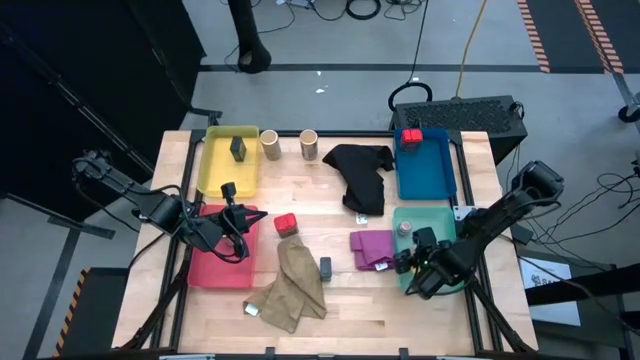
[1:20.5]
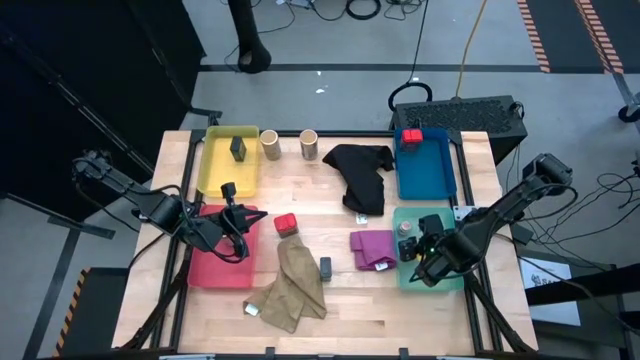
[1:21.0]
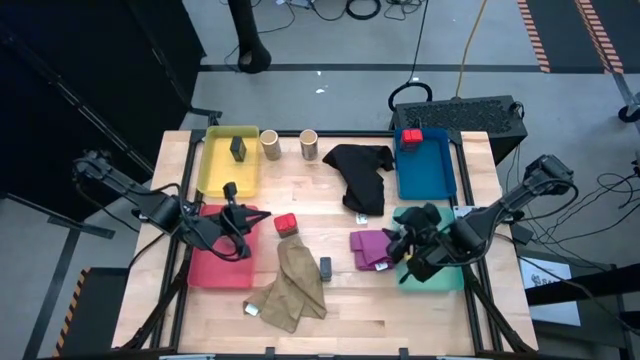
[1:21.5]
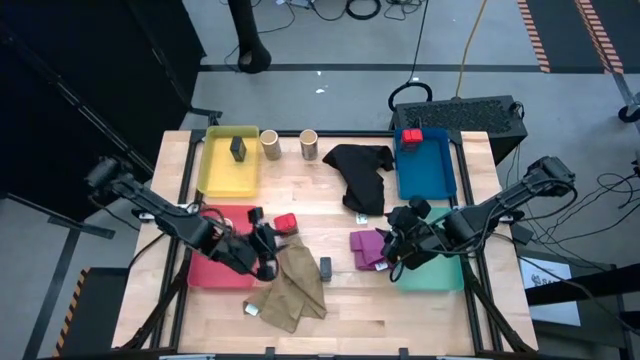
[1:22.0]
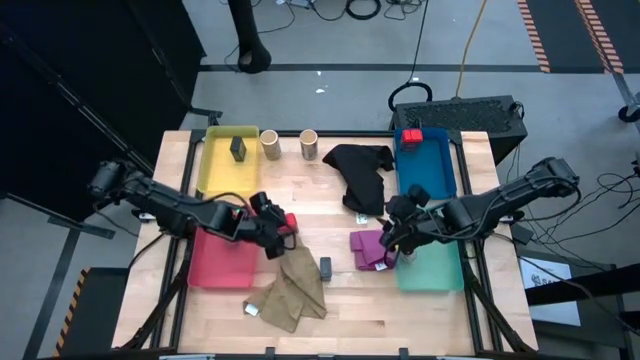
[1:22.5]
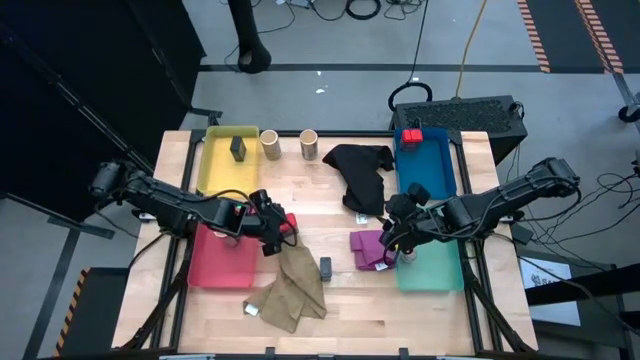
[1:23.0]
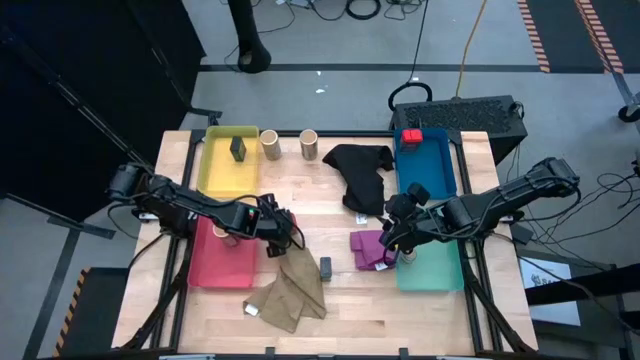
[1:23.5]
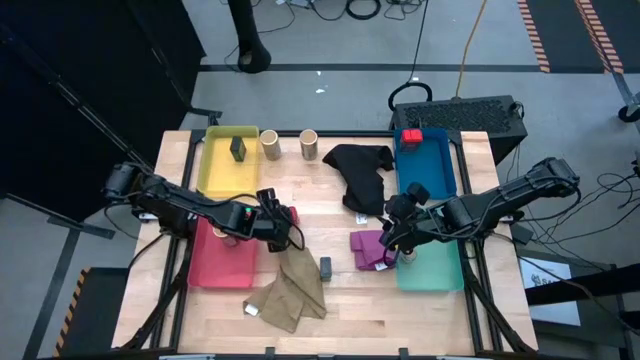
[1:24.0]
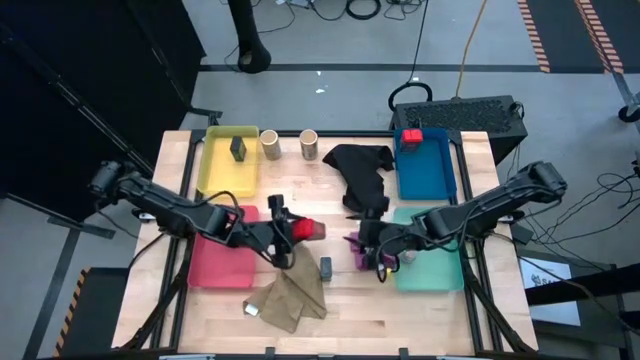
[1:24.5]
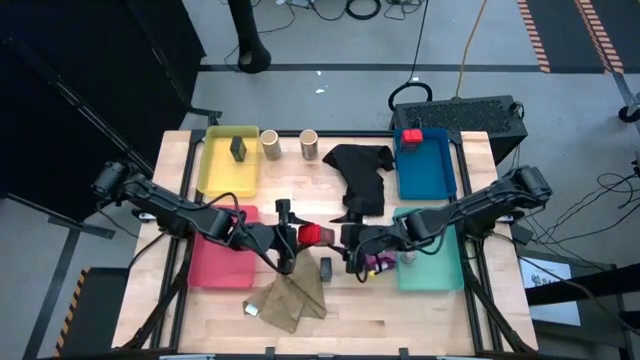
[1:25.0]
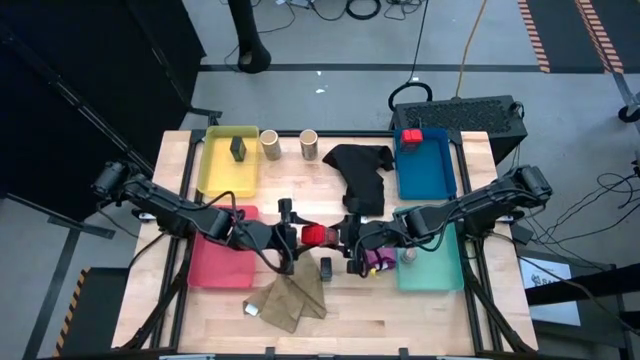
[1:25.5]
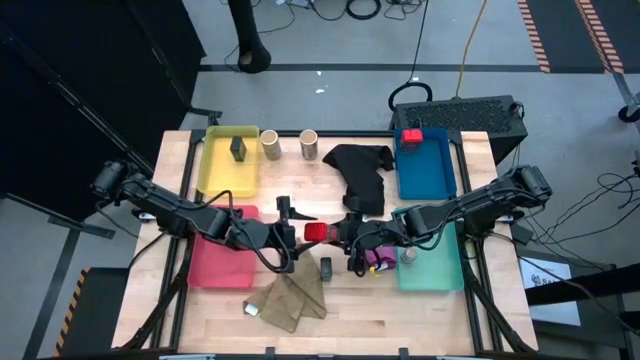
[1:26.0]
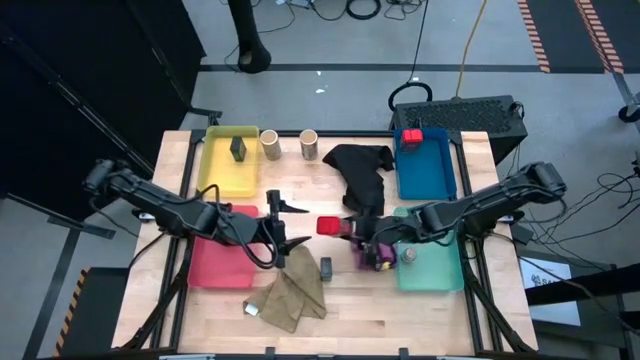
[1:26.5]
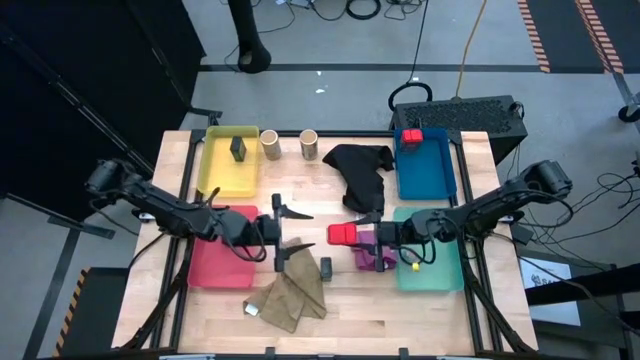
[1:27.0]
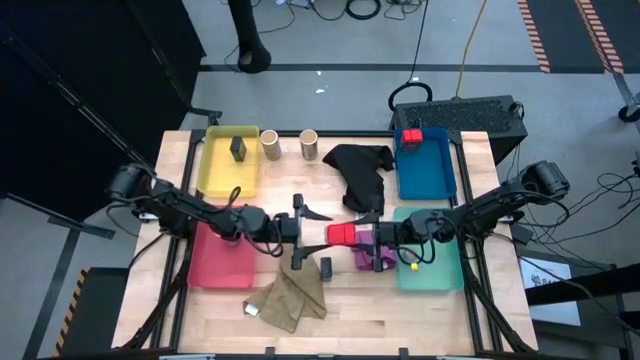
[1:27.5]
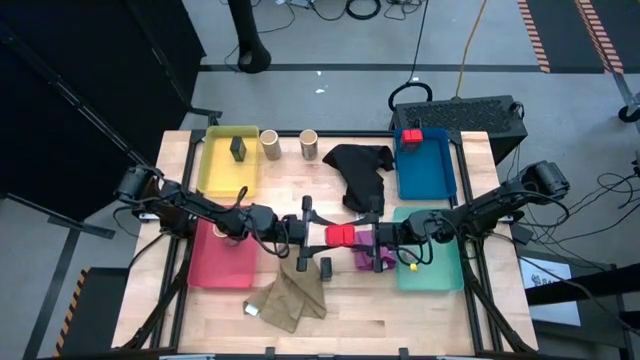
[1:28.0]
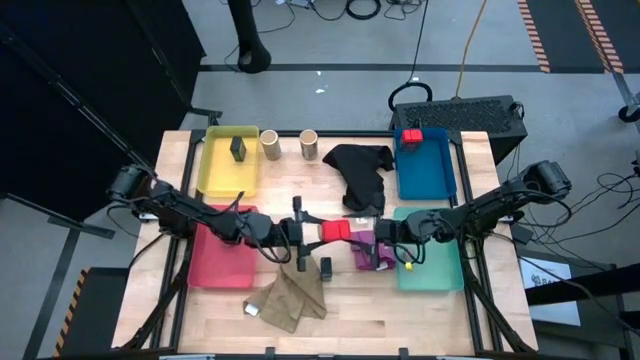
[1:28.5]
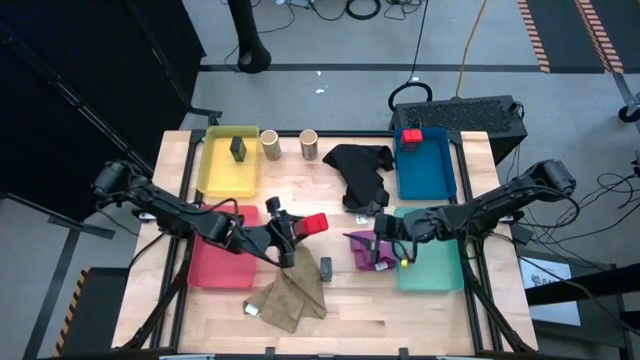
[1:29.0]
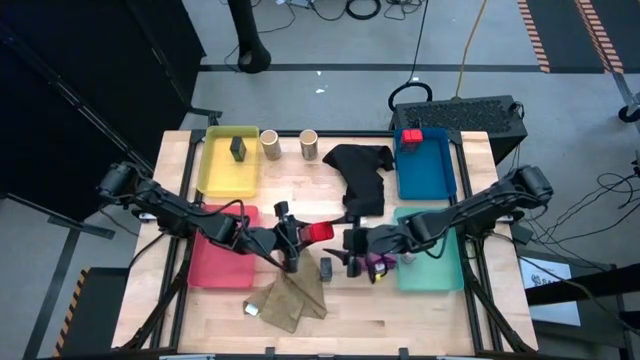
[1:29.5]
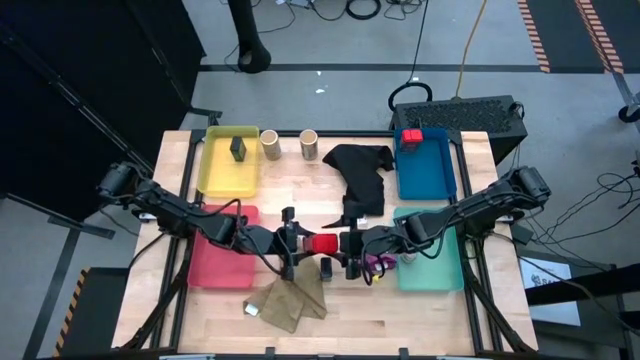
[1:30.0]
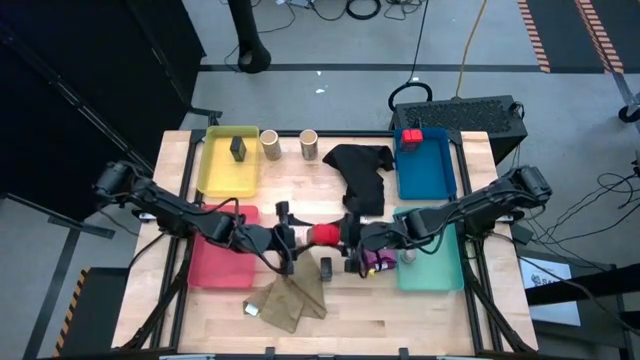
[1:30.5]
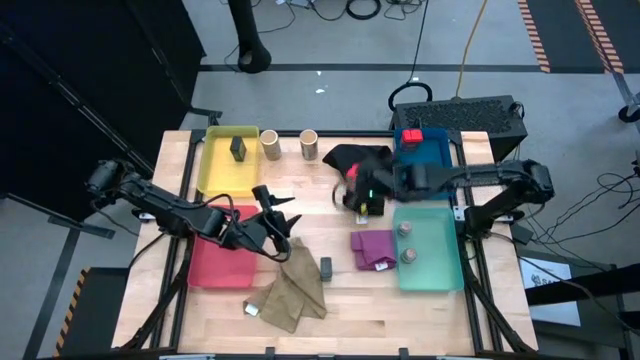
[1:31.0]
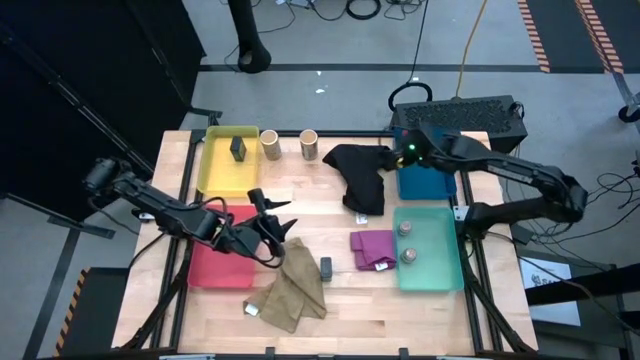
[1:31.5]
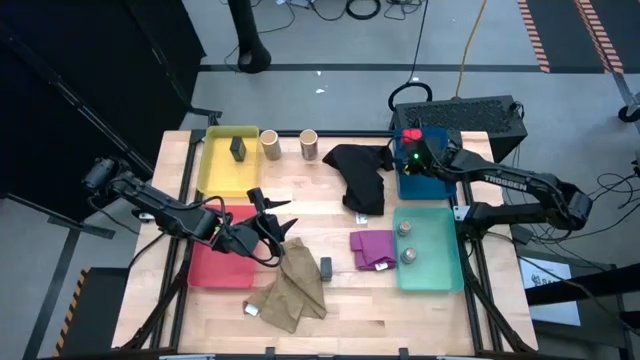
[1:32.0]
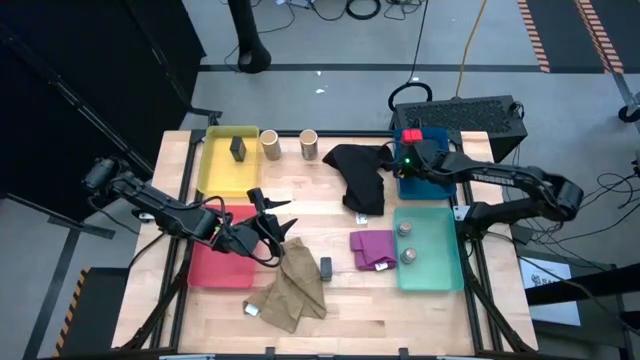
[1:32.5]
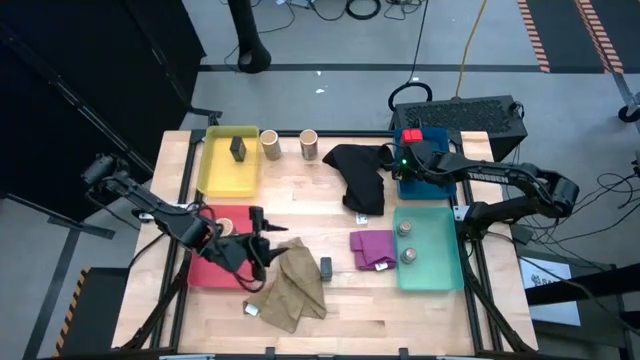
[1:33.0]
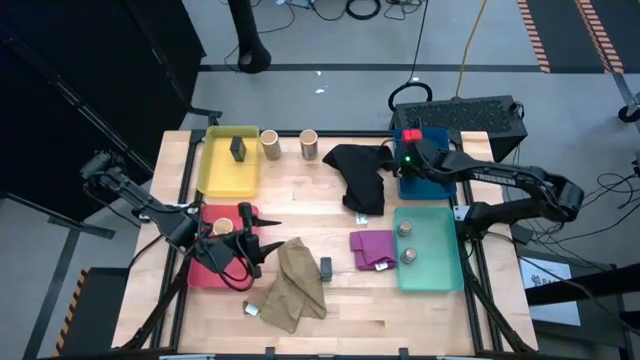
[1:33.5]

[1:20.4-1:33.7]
Task: Sort spices by type
Put the red seasoning can into the dark blue bin

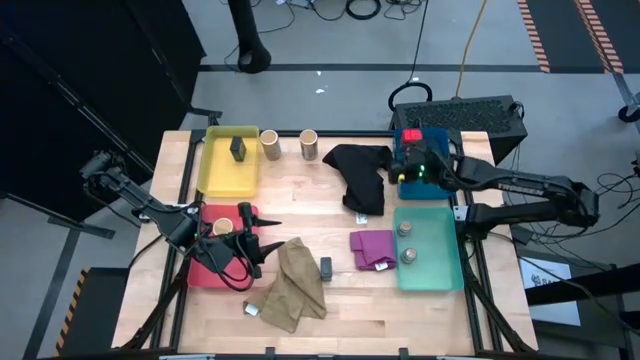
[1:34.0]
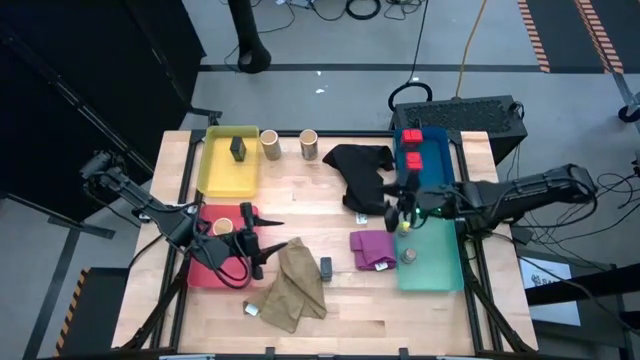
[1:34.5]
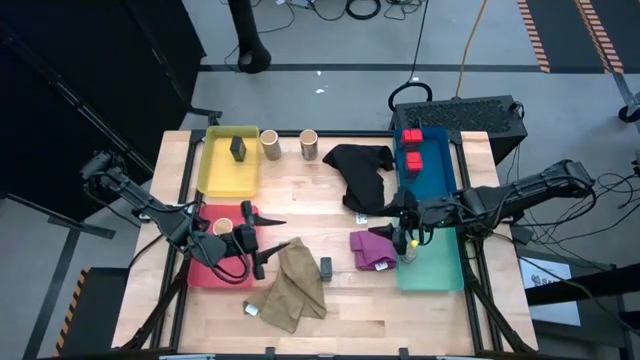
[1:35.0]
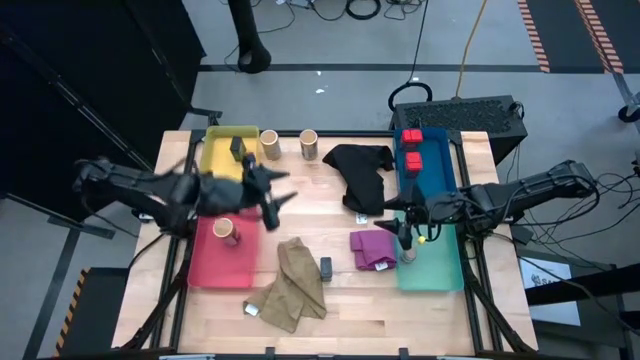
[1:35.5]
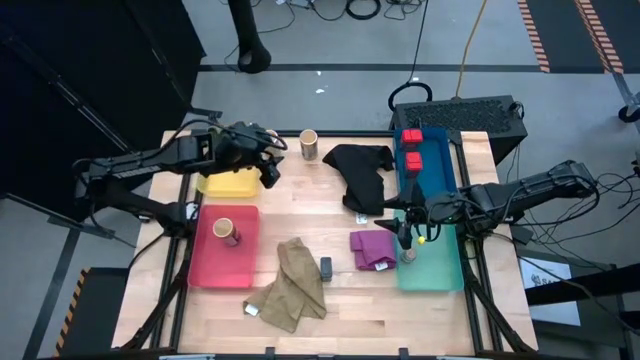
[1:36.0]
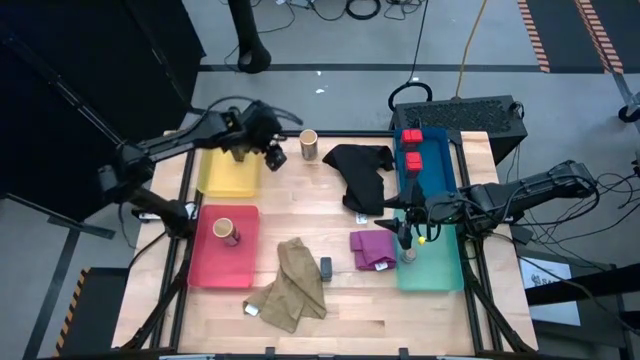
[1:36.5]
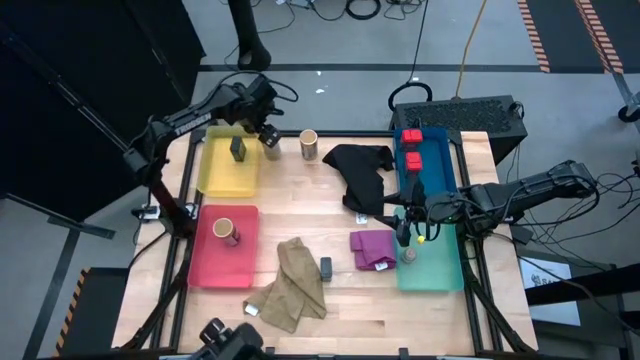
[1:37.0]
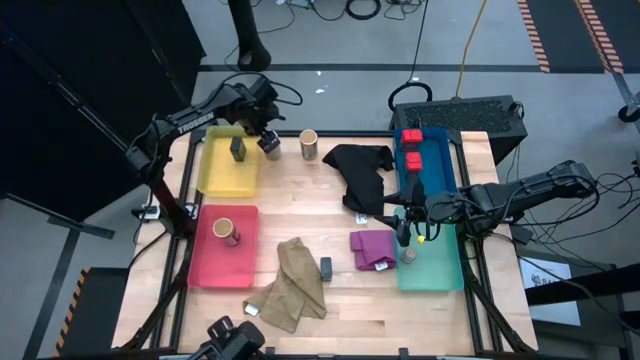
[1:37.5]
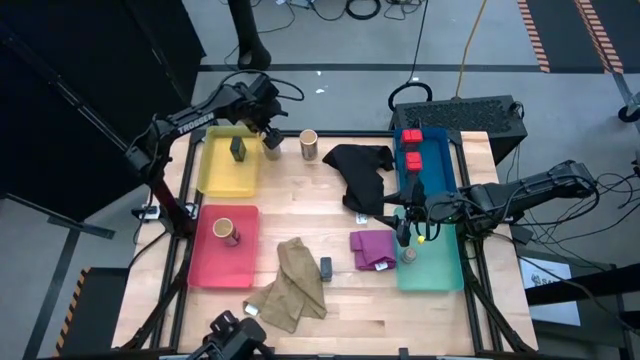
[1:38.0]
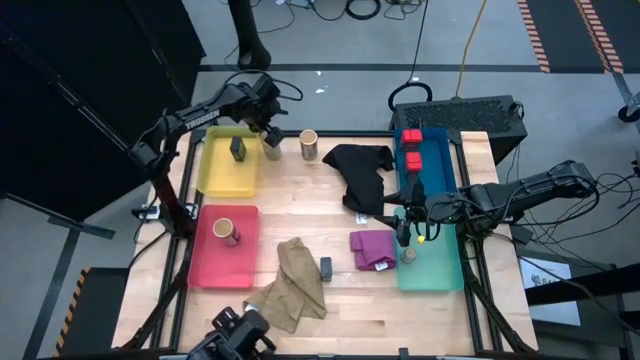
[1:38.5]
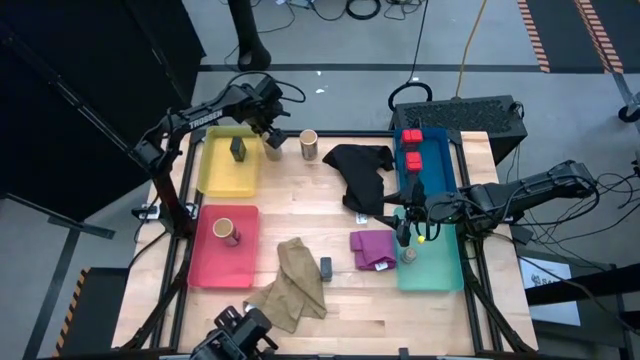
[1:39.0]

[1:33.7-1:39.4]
Put the left gold seasoning bottle into the red bin
